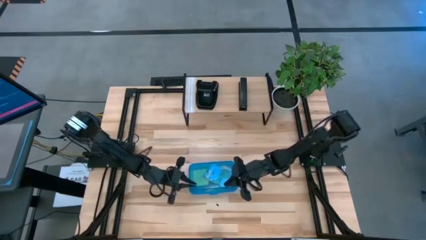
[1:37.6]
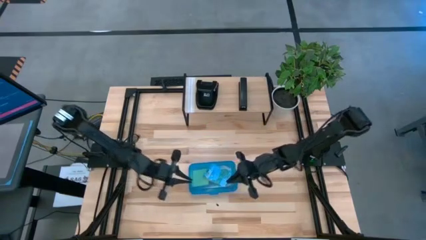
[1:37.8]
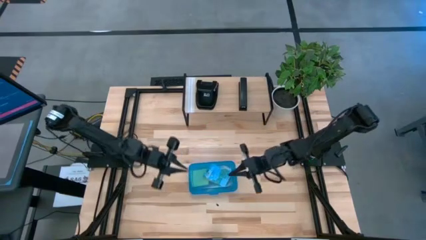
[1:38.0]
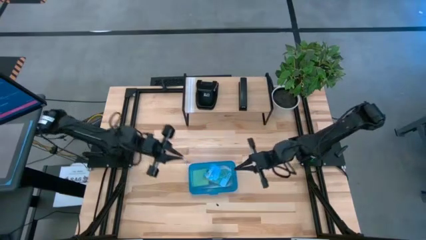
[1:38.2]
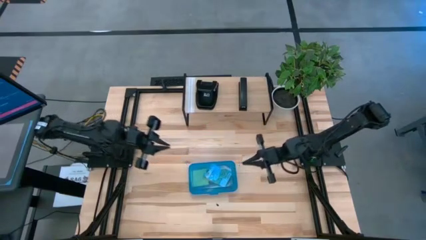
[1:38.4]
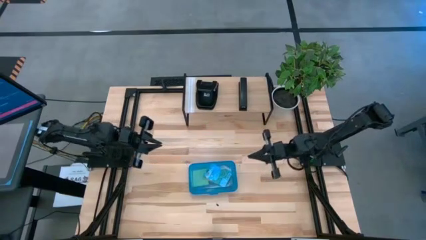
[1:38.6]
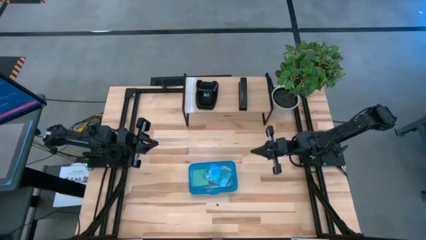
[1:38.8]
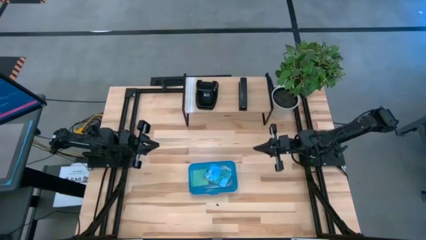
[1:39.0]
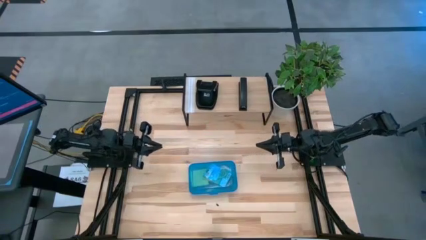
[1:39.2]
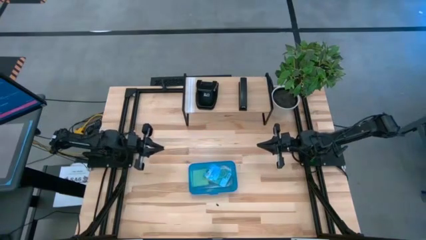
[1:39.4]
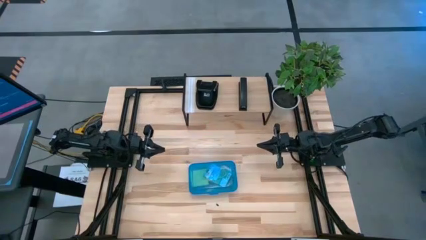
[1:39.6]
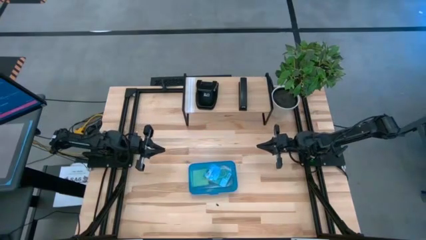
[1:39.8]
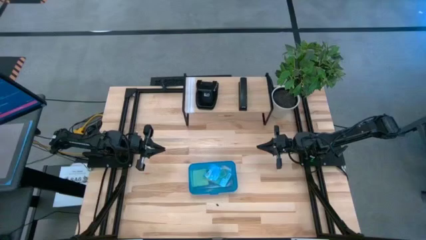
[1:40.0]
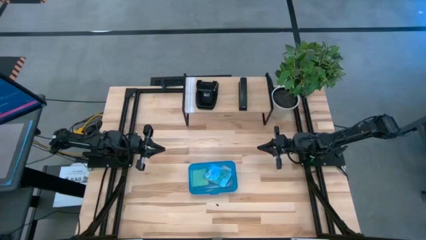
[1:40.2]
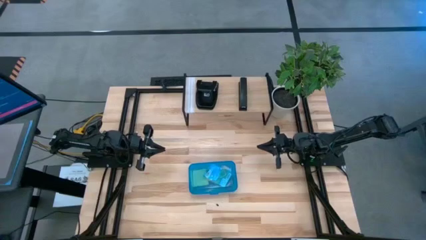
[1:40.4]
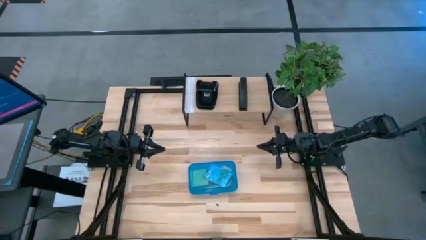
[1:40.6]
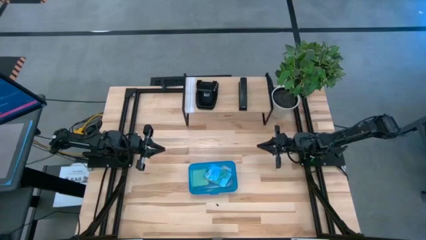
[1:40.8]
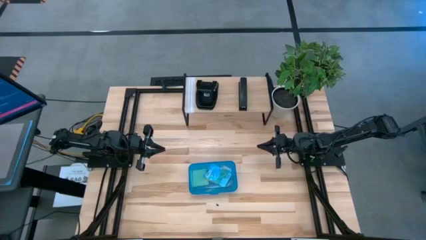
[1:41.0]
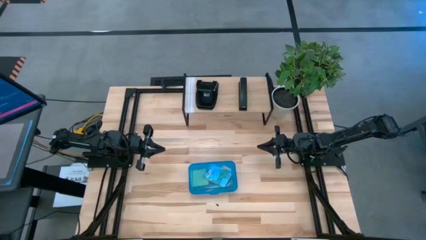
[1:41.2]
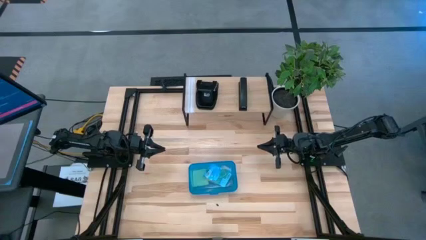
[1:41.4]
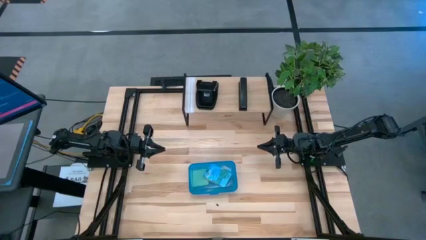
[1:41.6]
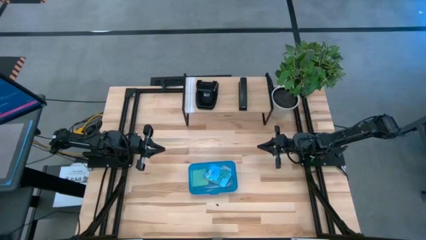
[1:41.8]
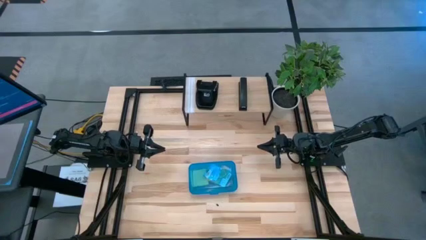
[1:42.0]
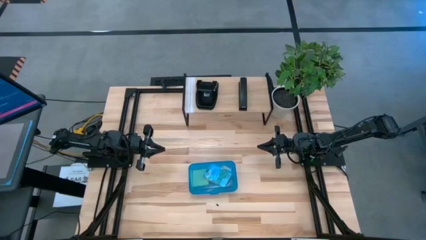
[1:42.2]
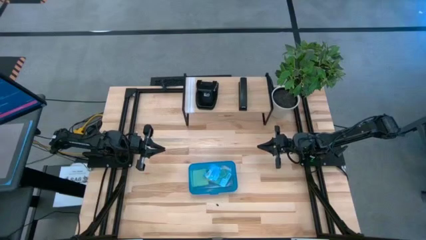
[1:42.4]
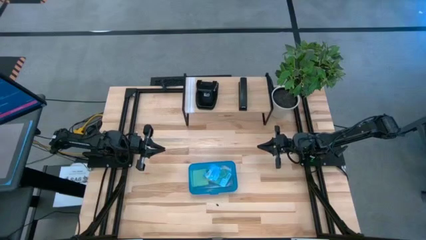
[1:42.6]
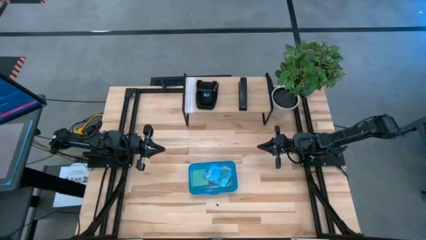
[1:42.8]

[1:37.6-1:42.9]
Task: Pack school essentials
Return to Home Position

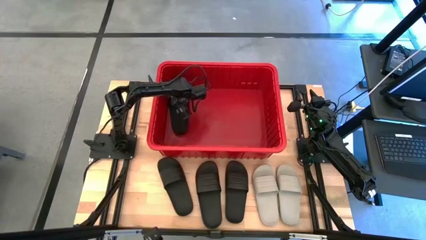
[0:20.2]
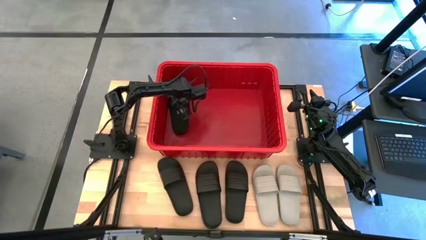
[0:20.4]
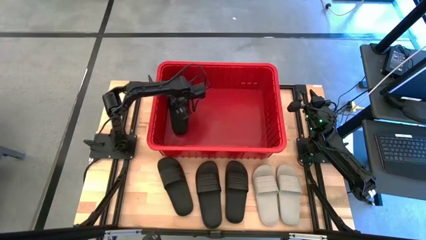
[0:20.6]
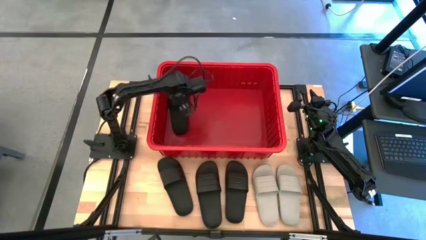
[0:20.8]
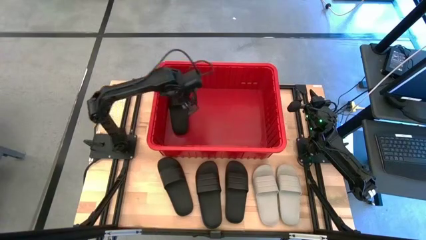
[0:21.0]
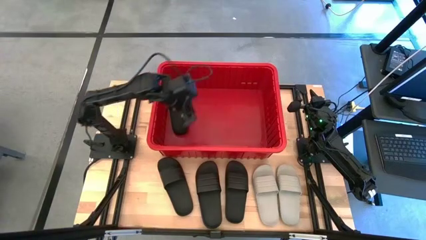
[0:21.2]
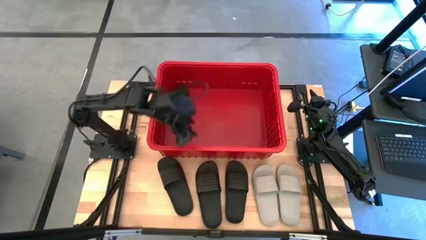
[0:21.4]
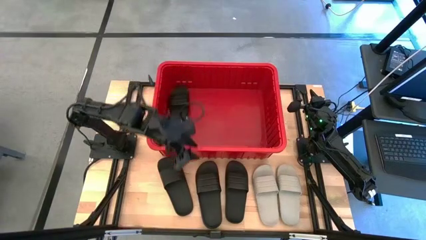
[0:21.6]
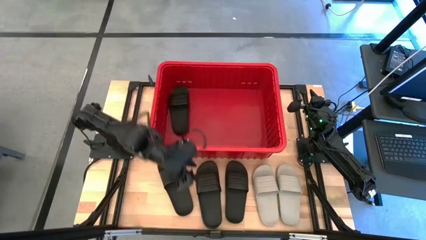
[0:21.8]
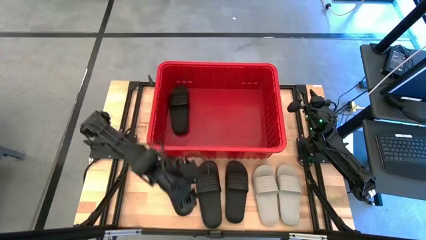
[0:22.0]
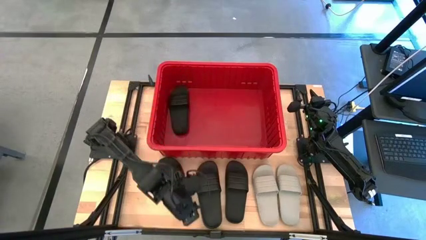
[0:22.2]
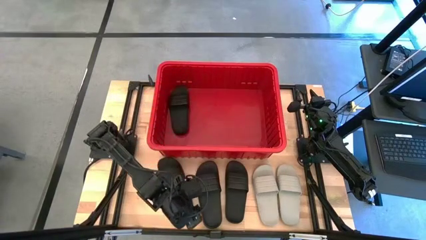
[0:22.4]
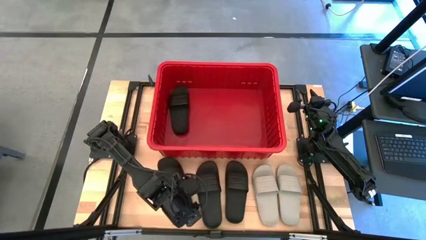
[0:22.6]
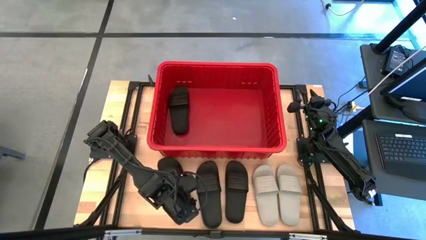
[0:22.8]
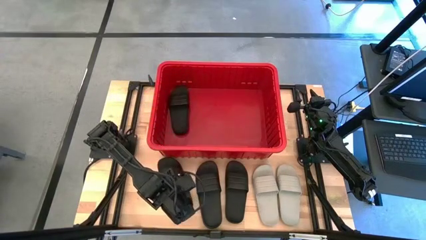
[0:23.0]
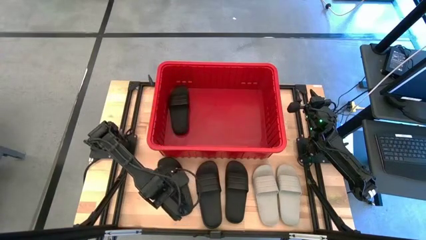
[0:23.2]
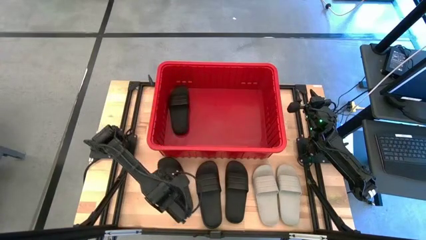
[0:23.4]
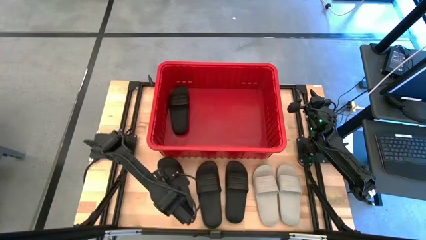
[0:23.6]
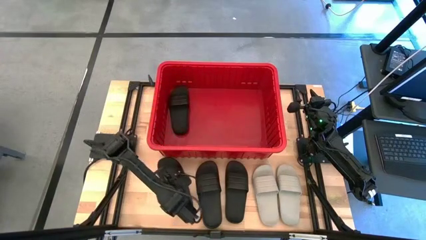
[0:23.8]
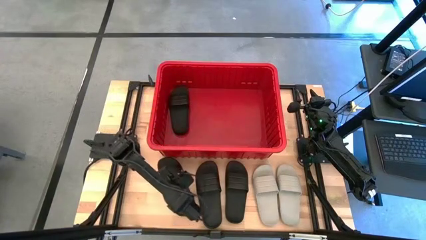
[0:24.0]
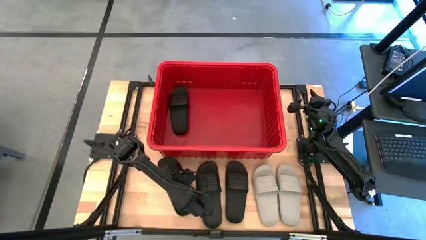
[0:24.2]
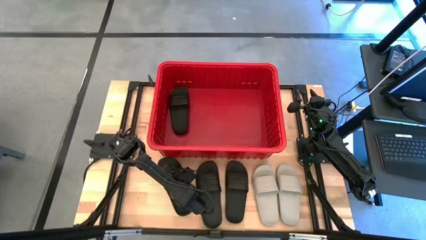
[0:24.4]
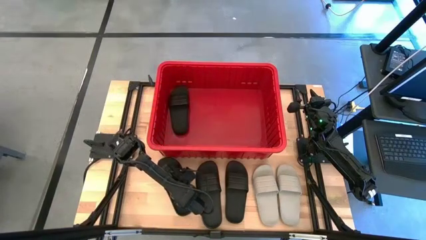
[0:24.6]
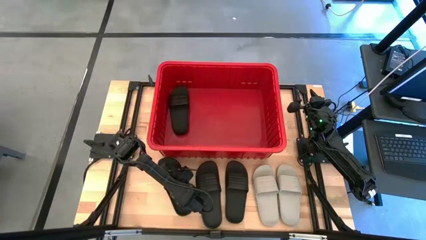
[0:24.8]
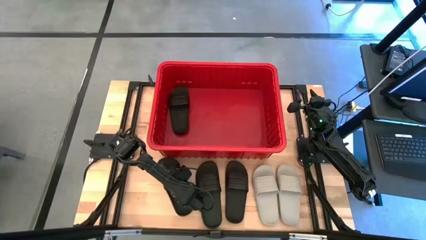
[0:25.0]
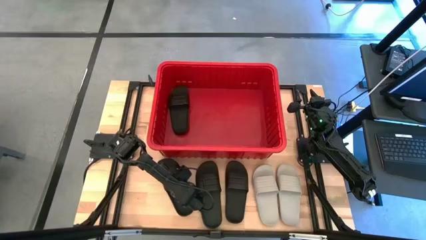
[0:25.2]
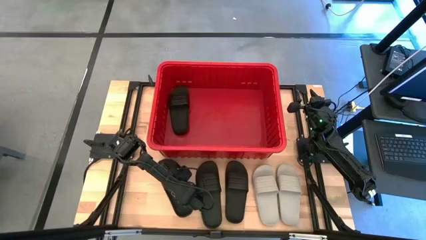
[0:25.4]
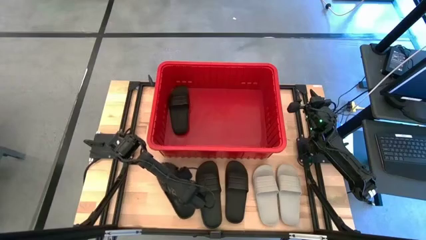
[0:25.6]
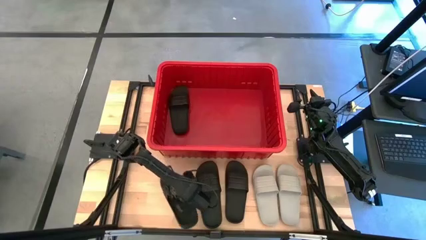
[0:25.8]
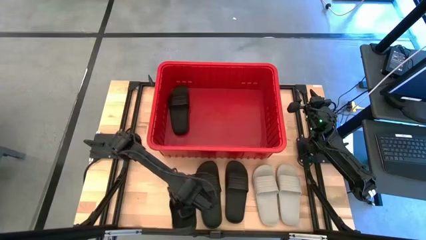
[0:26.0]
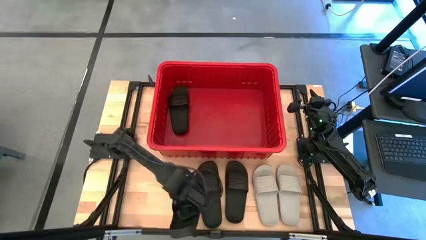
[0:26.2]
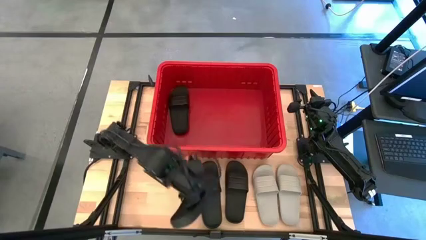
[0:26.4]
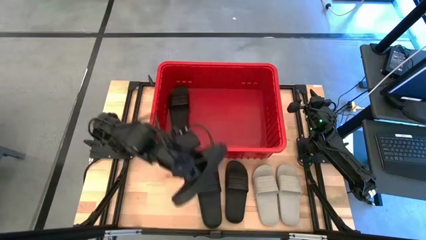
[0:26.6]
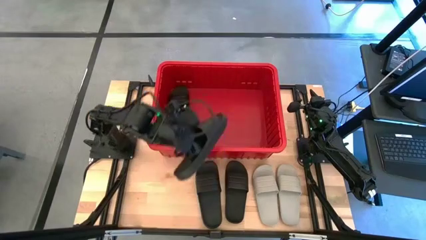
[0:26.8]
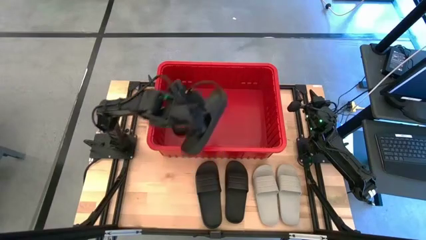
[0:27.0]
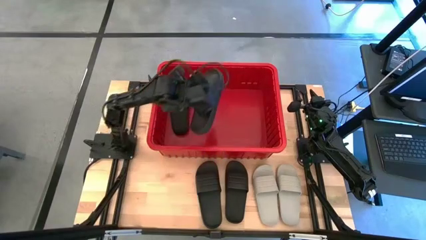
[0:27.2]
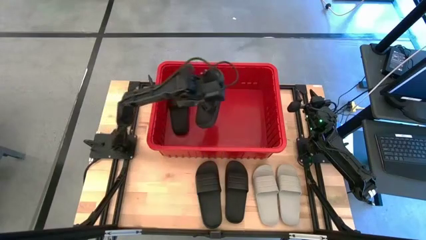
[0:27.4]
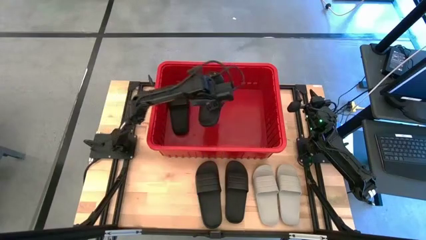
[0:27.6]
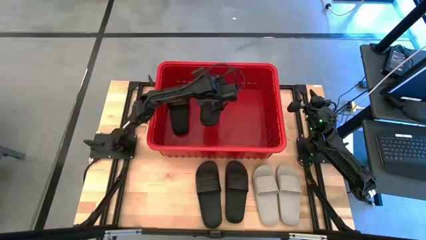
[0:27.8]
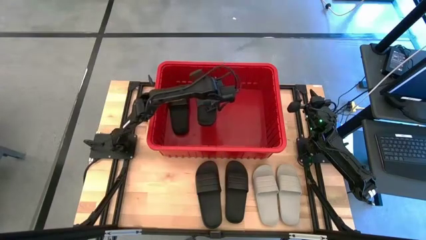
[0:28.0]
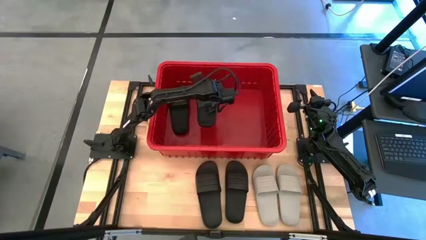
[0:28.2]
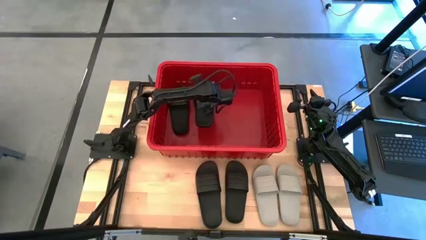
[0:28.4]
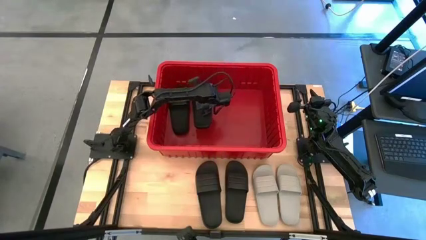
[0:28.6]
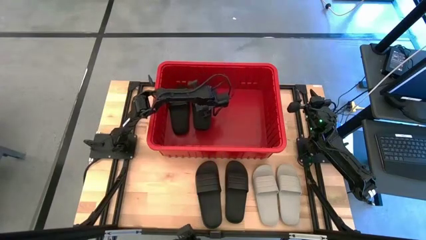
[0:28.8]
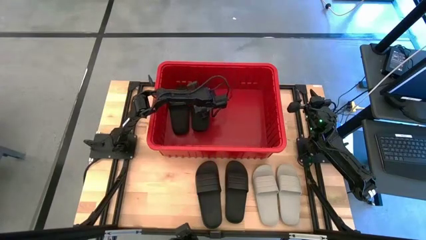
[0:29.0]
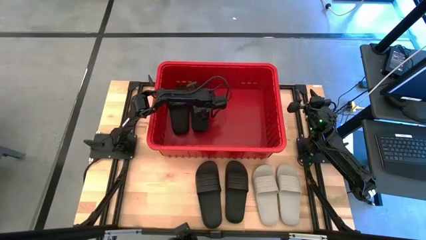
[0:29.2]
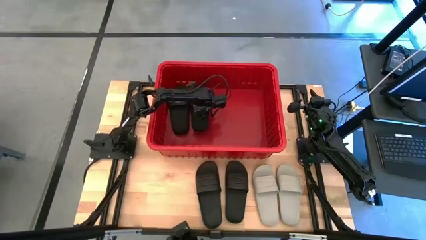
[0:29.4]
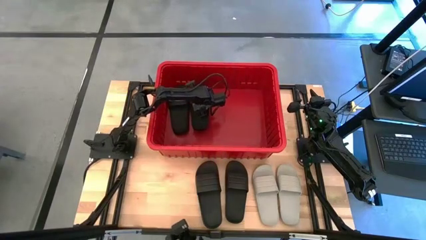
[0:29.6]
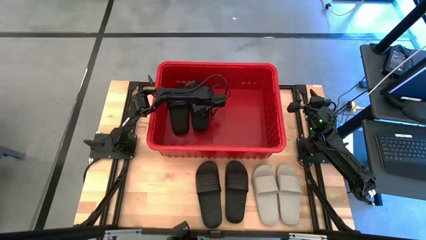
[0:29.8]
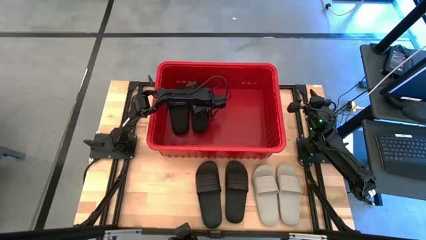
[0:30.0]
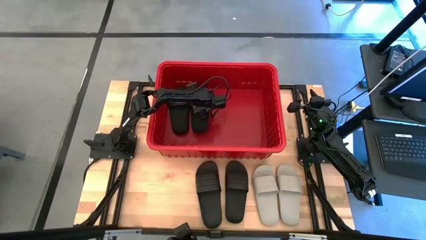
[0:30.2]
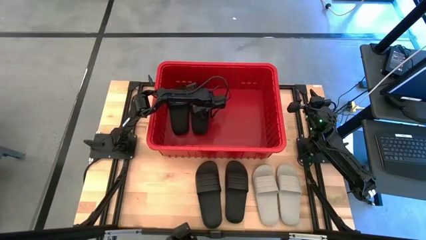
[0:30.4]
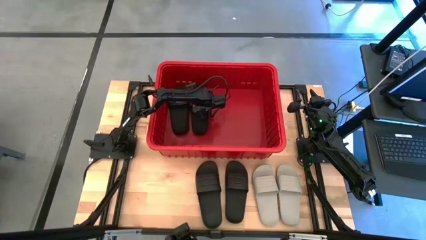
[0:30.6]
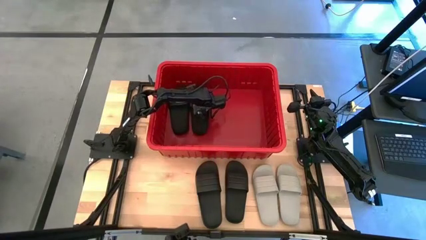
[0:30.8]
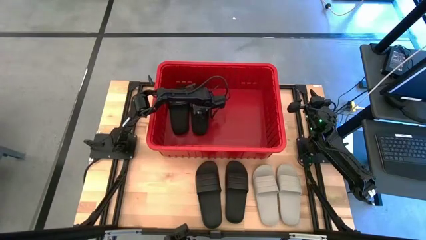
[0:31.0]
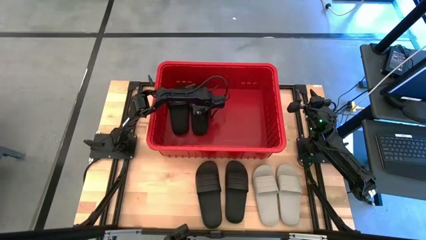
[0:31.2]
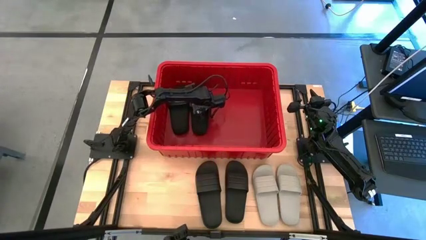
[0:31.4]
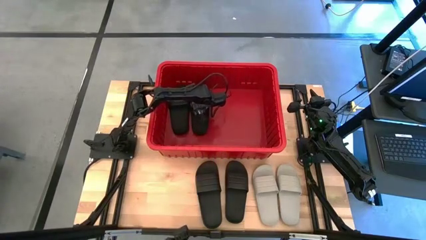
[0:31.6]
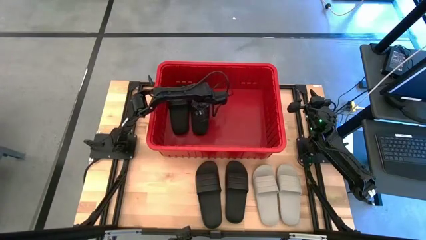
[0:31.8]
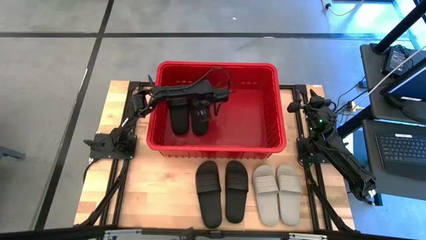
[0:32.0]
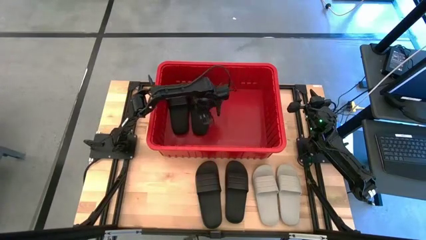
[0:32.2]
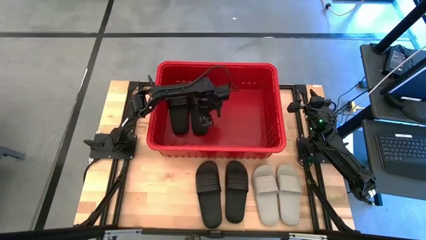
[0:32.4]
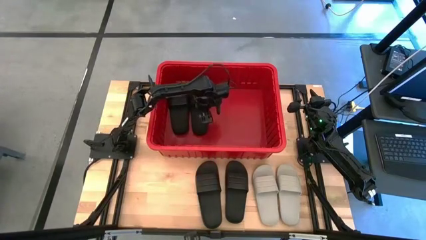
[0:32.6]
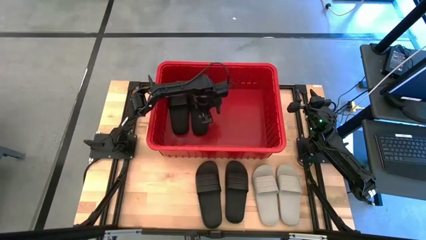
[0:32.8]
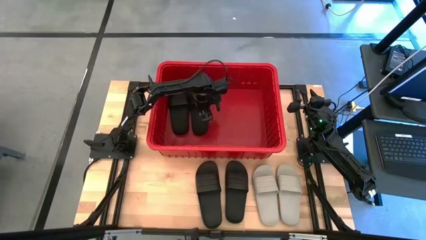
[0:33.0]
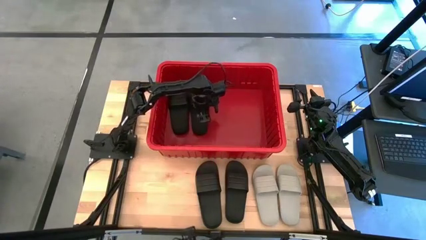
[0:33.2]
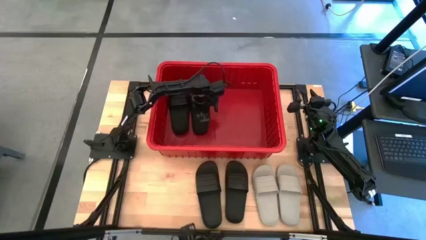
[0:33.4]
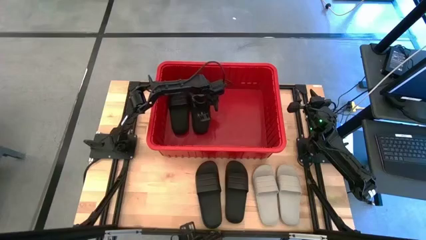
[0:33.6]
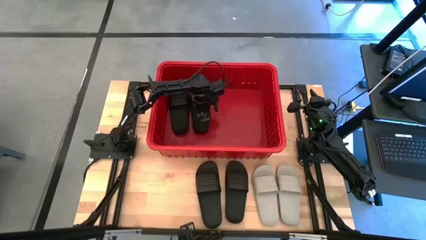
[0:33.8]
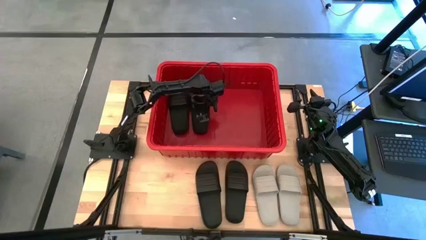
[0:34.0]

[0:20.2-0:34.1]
Task: Pick and place slides into bin
Put the black slide into the red bin
